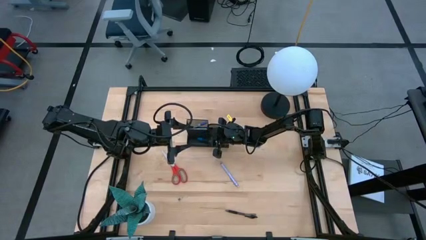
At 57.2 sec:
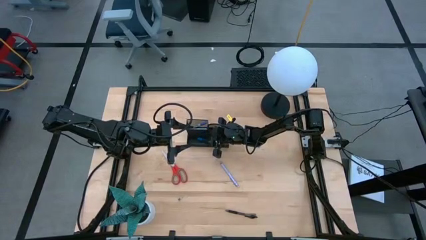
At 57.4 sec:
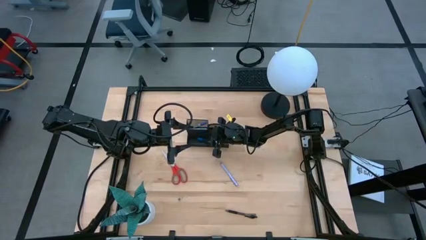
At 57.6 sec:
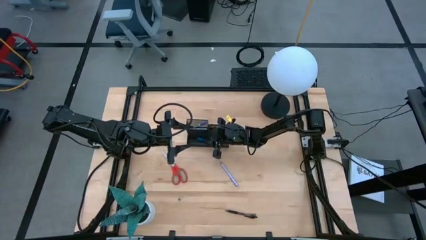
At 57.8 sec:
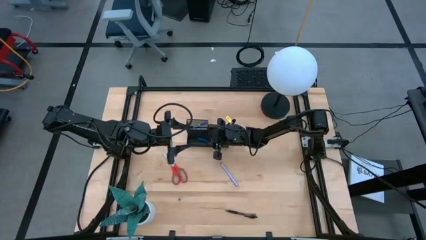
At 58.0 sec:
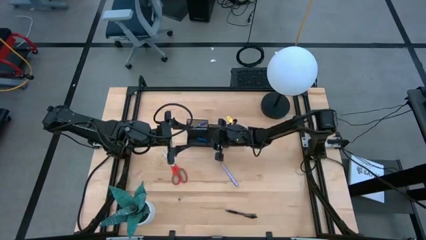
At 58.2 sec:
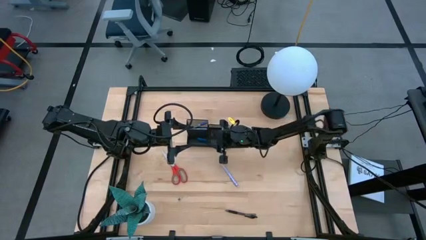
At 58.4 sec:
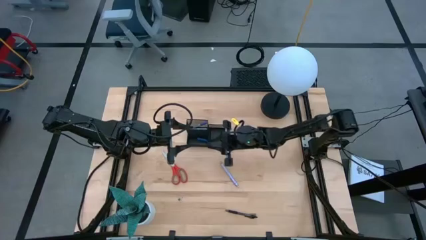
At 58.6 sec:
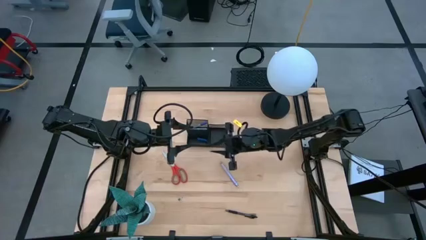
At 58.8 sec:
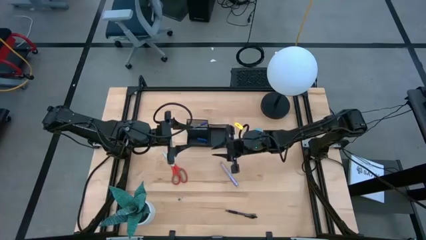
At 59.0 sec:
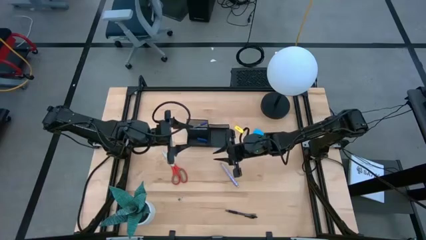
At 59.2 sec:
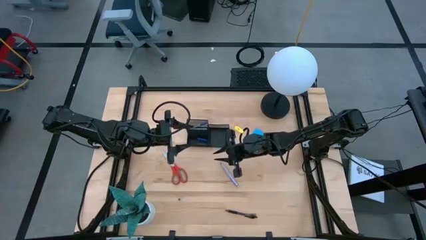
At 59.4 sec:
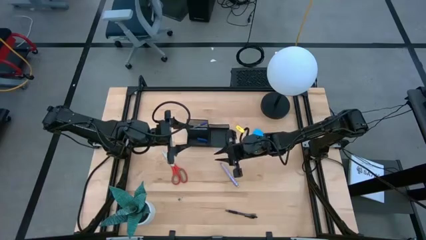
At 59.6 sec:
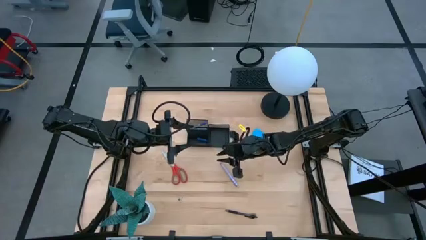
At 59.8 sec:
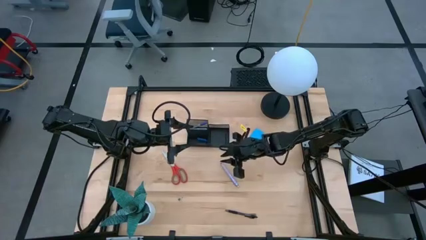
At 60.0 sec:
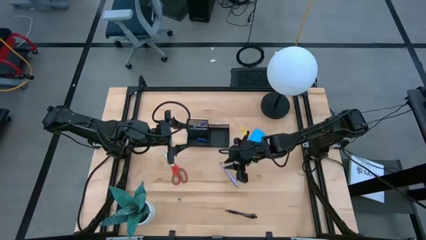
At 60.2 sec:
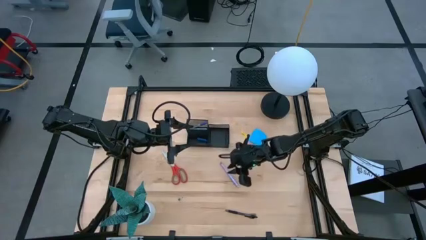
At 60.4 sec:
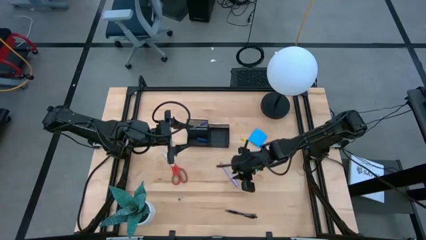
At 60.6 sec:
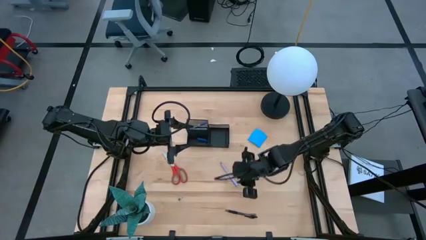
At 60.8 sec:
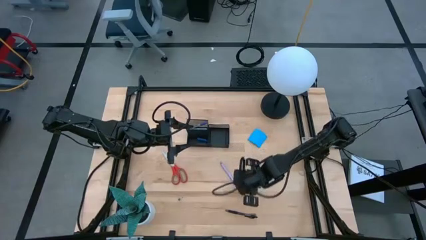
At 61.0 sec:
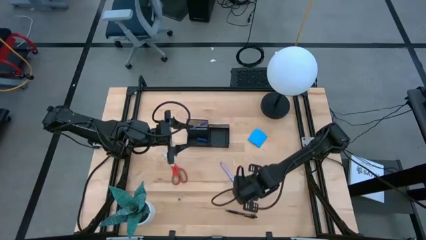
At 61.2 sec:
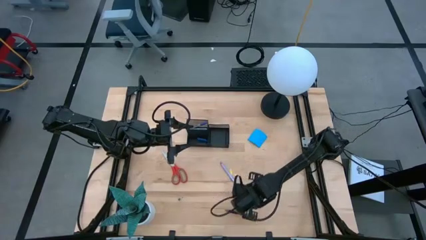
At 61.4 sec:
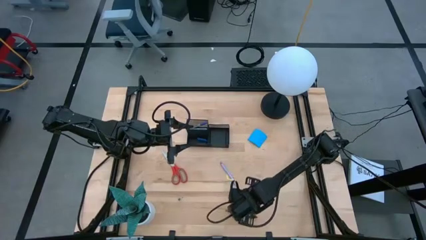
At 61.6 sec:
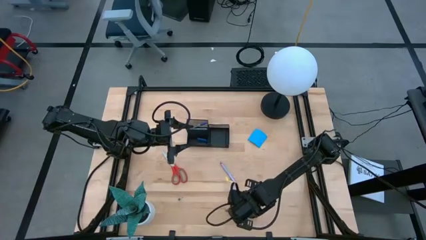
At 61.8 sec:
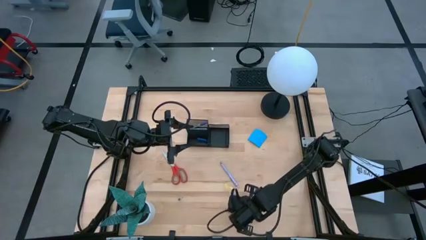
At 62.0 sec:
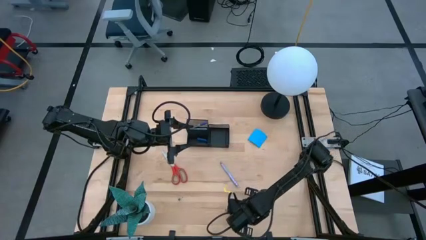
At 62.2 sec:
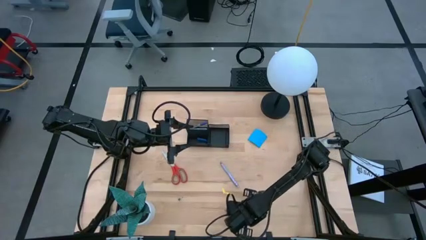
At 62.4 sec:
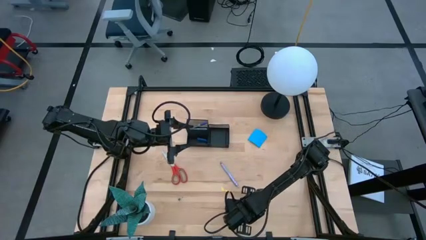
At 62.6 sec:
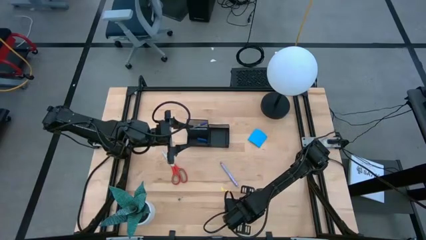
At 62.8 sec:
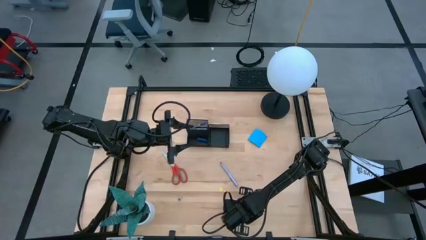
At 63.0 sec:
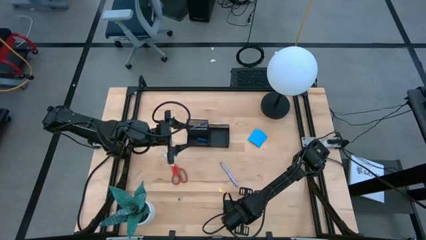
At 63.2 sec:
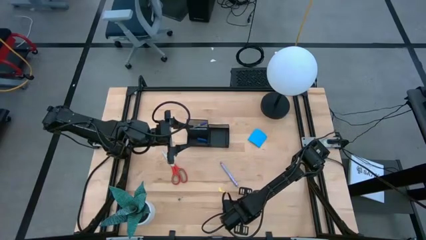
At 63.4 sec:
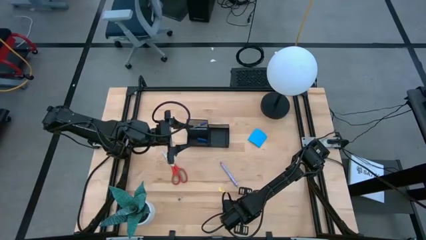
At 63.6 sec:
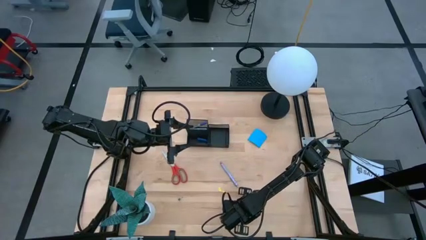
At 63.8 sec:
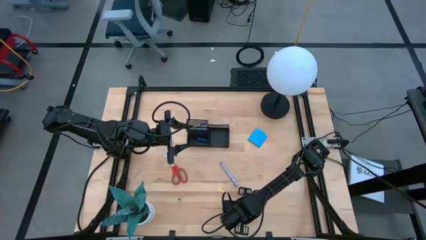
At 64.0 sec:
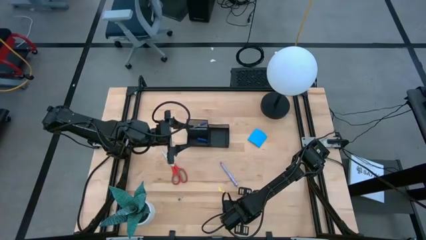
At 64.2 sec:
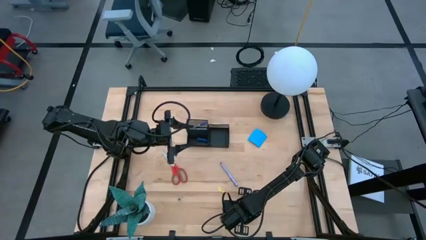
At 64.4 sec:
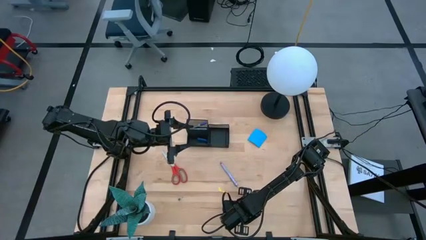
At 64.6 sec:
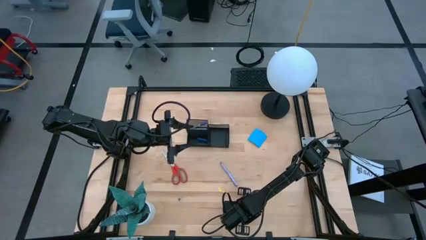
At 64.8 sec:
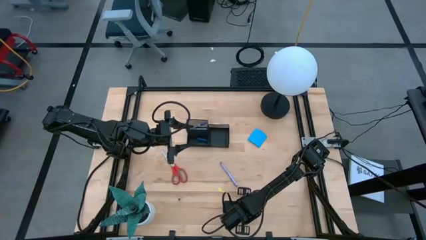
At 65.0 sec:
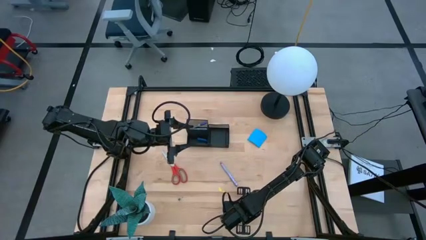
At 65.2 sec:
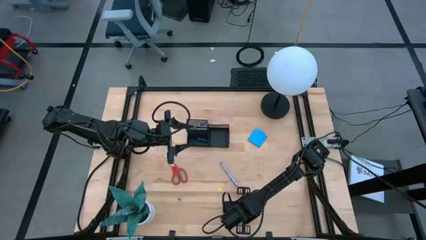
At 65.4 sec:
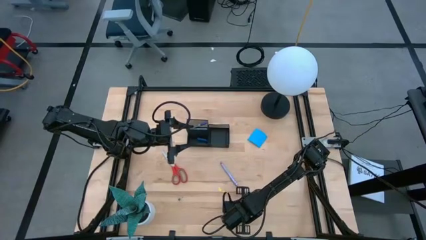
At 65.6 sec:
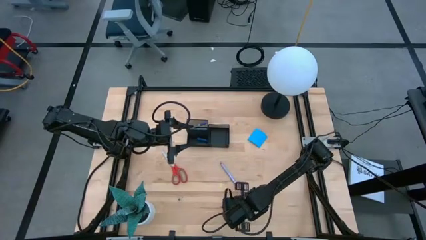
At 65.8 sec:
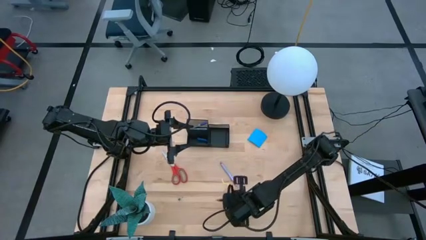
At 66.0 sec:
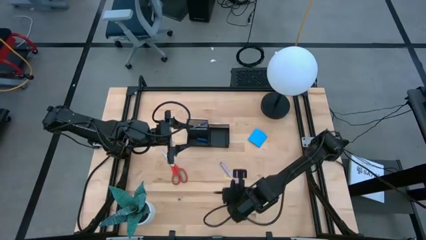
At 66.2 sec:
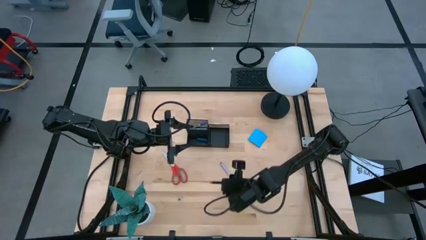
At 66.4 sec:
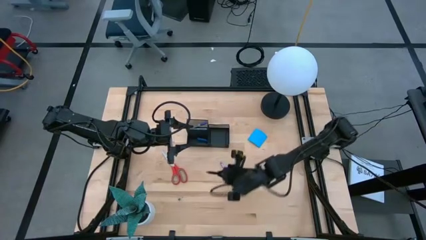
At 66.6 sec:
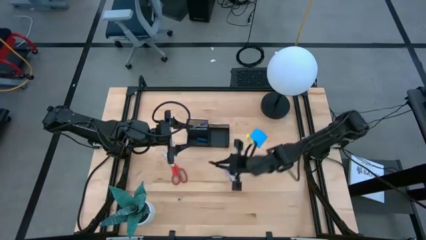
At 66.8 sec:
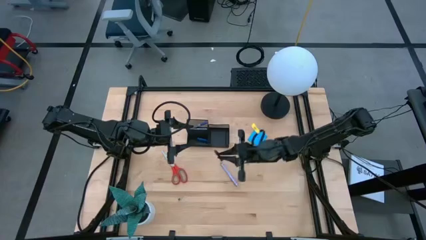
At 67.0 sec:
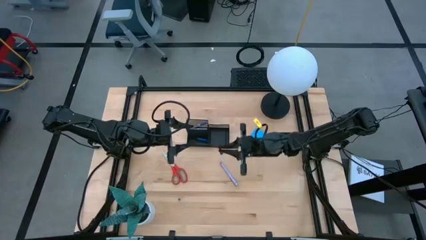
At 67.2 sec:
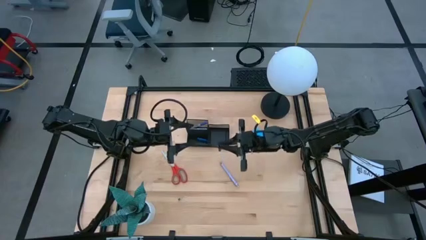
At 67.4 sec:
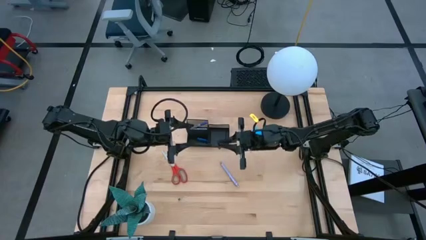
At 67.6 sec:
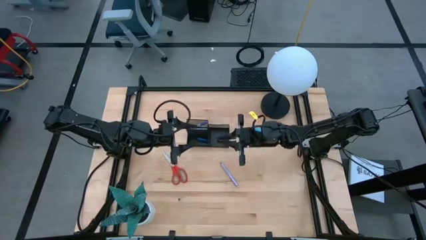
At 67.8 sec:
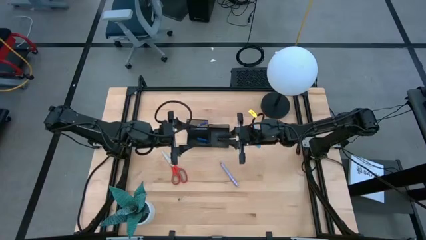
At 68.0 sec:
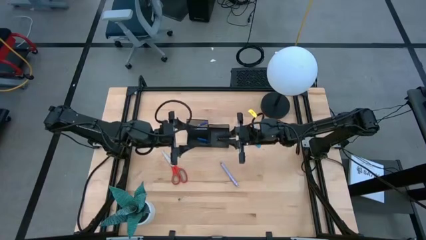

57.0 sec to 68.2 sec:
Task: Pick and place office supplies into organizer
Put the black pen into the desk organizer

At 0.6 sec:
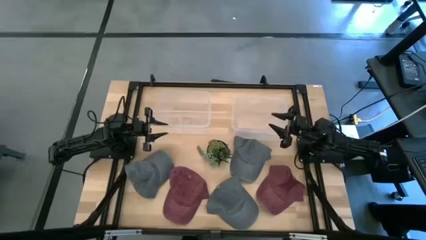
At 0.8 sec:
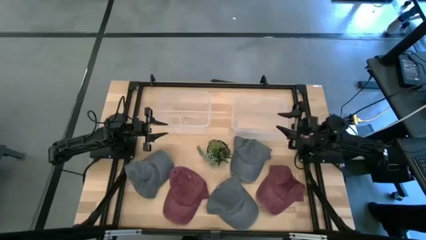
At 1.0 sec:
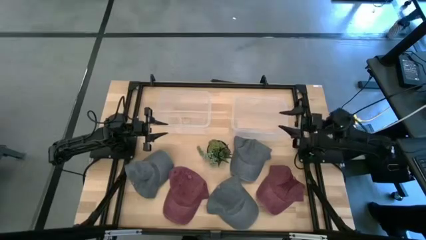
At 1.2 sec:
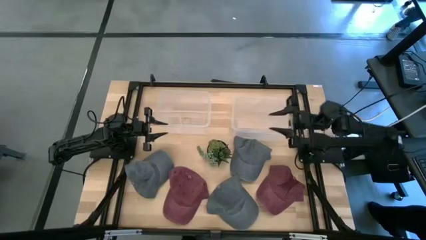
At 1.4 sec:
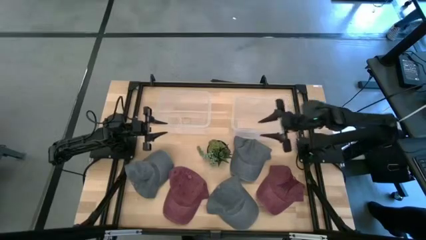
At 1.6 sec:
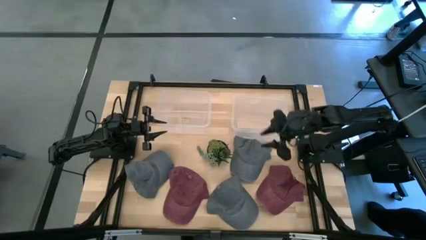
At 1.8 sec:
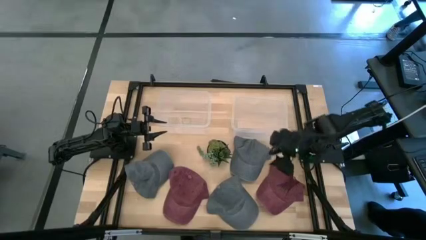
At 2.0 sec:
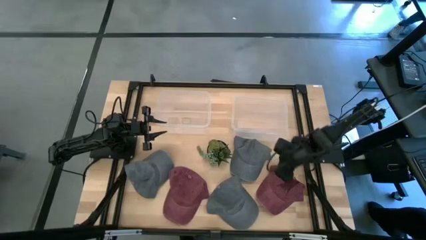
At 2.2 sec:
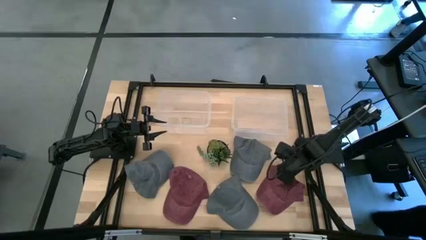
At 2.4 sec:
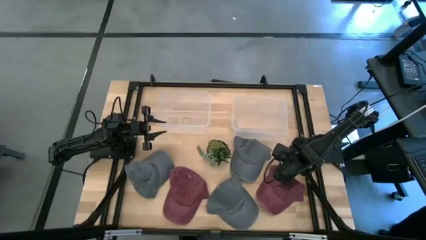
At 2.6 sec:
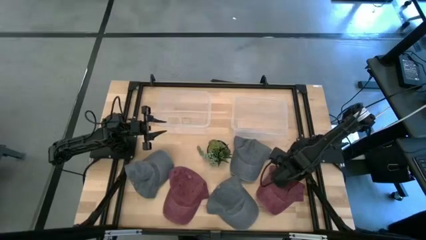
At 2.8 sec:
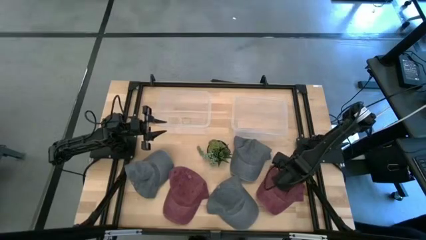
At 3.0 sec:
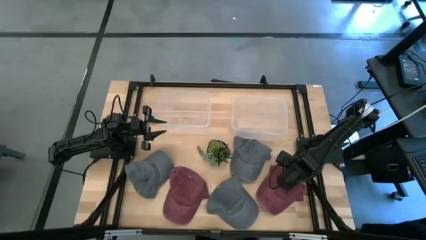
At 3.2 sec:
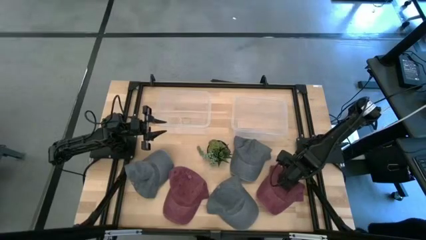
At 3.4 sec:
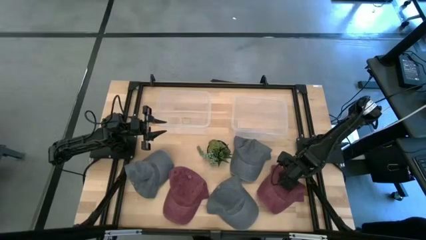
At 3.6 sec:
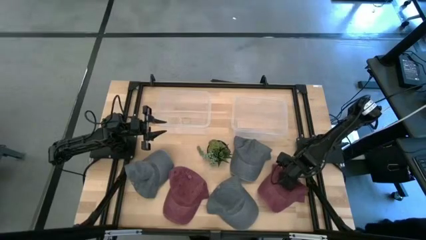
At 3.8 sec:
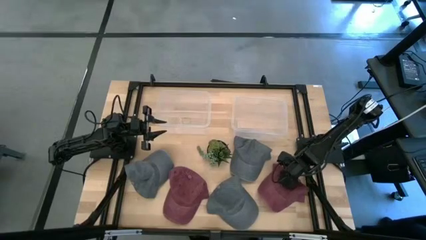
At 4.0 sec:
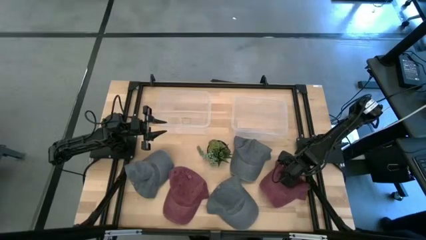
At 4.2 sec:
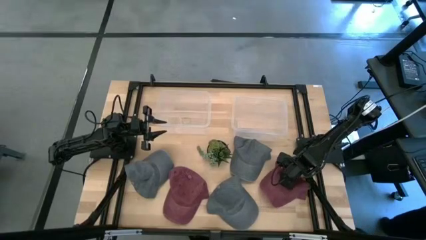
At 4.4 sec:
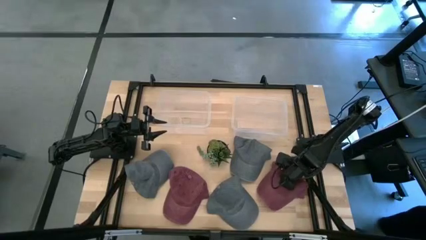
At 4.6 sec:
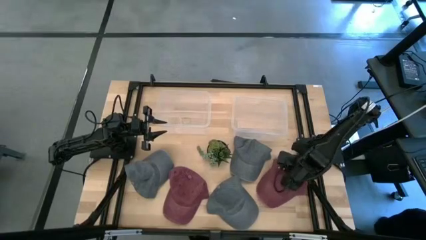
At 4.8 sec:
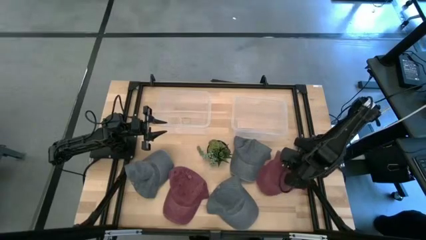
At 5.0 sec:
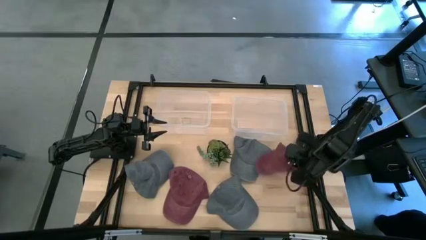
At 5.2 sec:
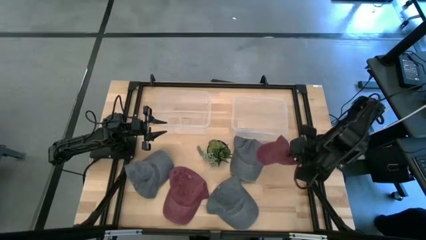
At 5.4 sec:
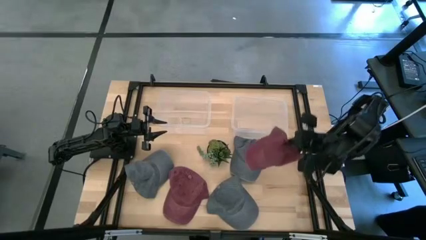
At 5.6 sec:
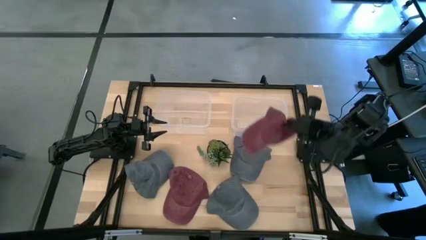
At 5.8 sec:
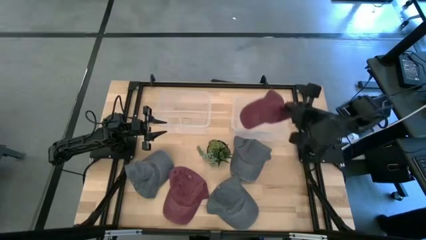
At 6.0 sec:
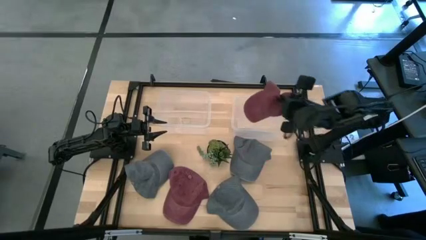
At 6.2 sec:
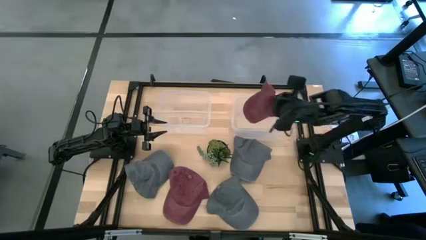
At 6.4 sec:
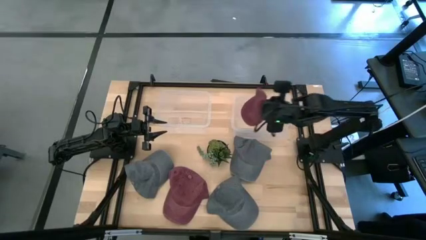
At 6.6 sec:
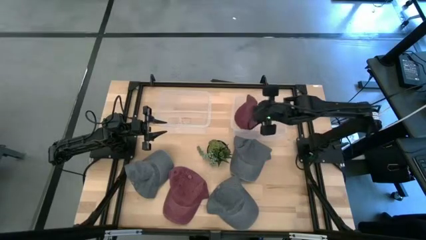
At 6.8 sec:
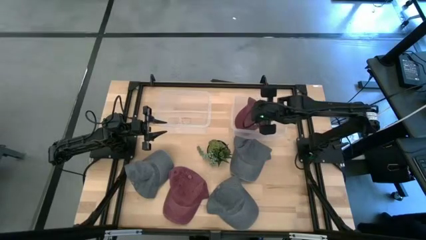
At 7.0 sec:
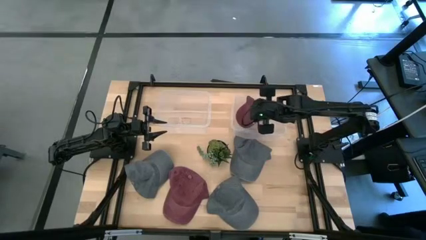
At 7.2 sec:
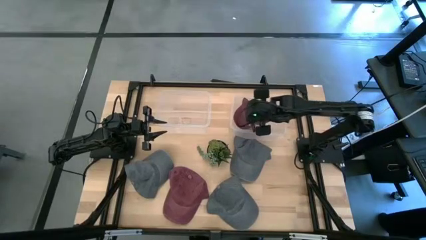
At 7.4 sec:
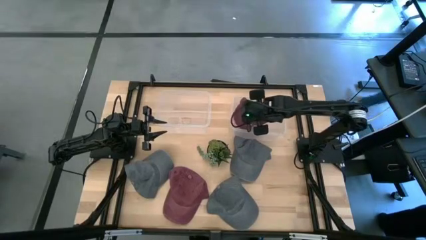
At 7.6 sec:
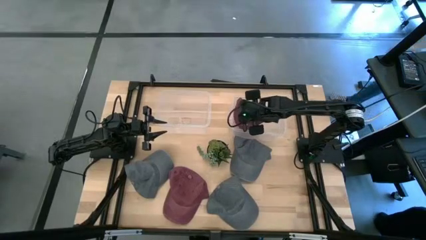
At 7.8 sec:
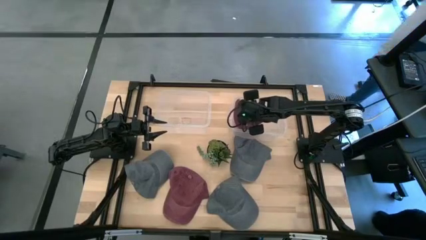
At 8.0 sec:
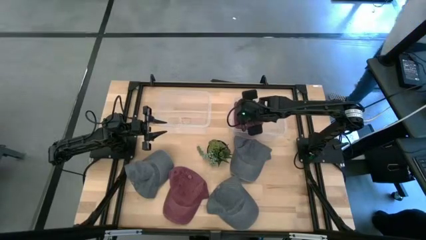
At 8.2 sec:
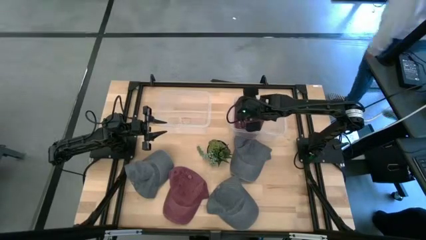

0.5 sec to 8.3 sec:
Task: Pick & Place hat
Put the right red cap into the right transparent bin
